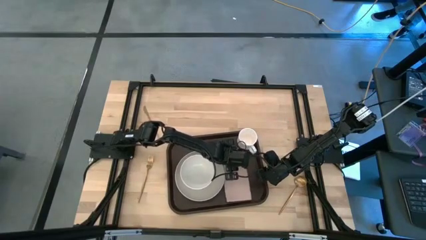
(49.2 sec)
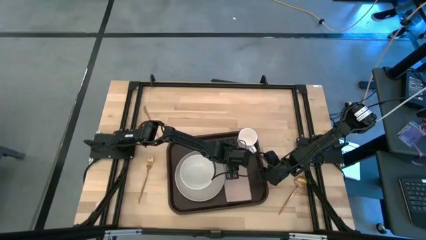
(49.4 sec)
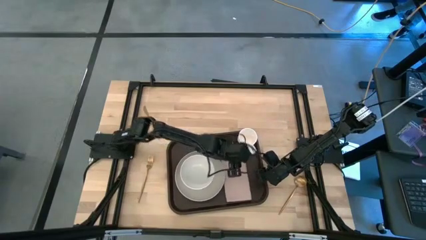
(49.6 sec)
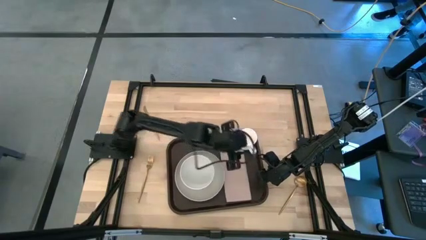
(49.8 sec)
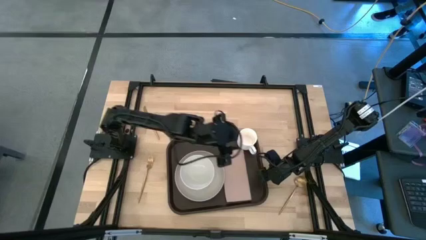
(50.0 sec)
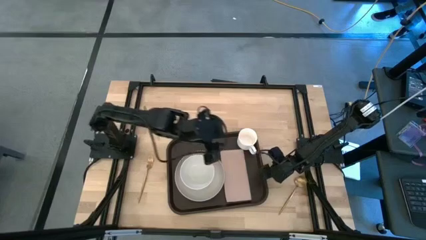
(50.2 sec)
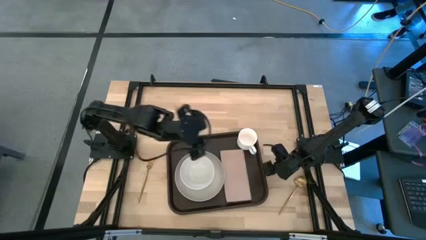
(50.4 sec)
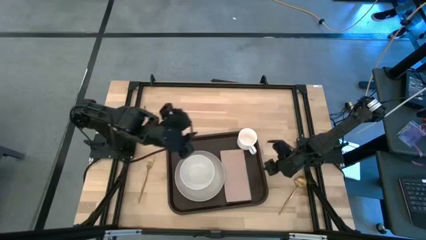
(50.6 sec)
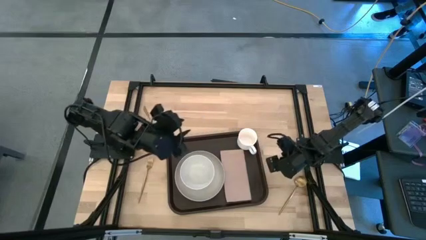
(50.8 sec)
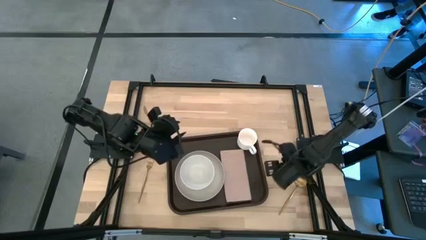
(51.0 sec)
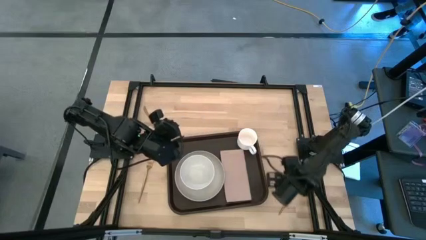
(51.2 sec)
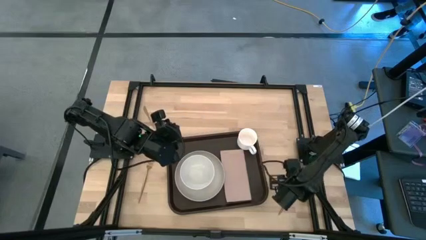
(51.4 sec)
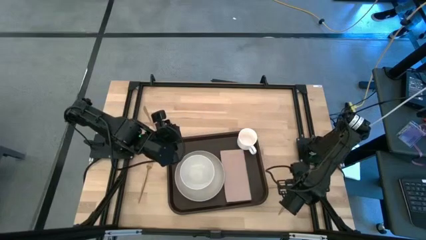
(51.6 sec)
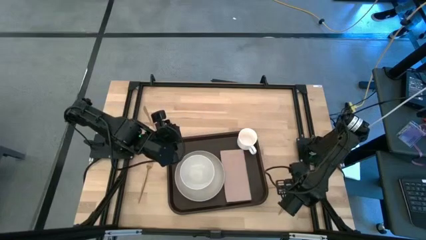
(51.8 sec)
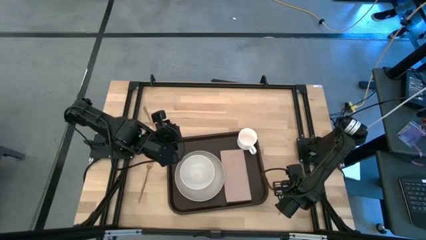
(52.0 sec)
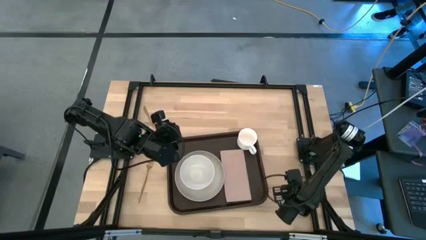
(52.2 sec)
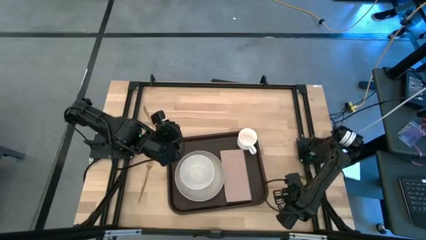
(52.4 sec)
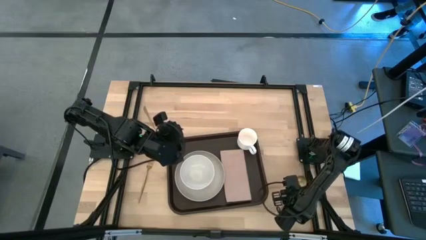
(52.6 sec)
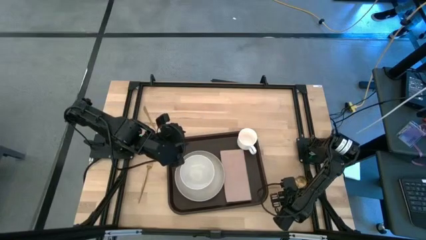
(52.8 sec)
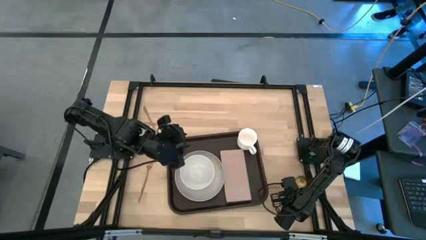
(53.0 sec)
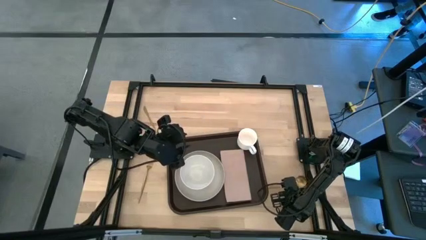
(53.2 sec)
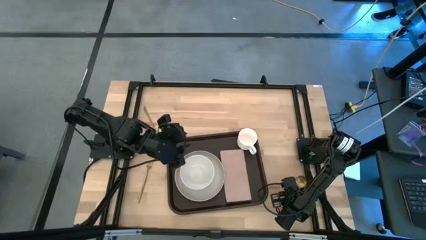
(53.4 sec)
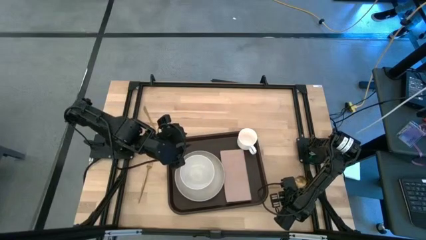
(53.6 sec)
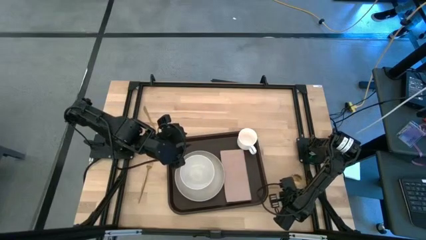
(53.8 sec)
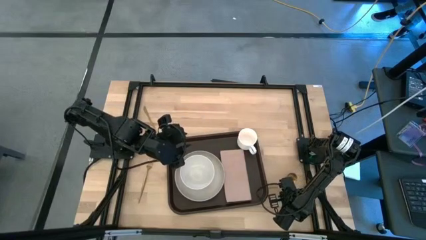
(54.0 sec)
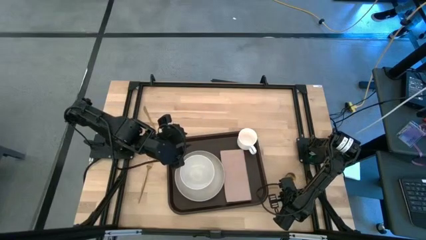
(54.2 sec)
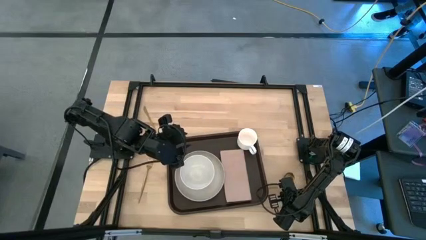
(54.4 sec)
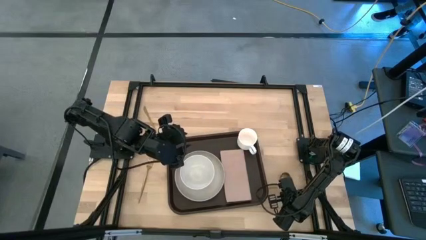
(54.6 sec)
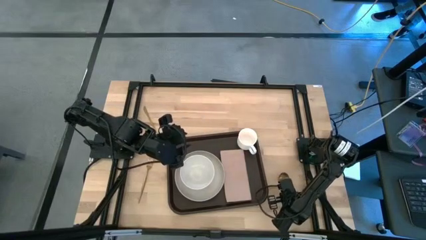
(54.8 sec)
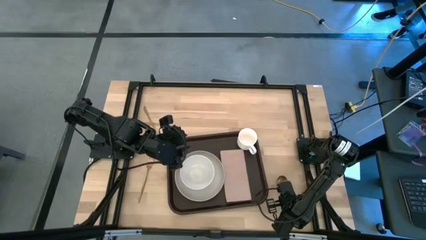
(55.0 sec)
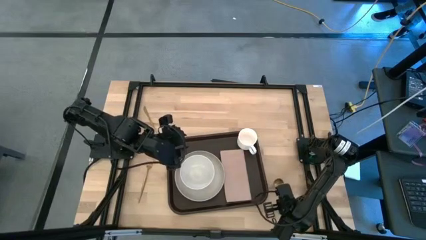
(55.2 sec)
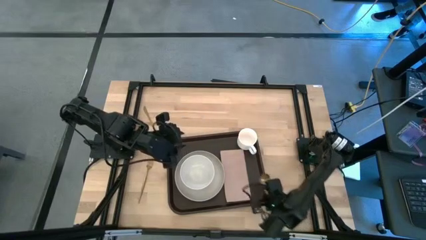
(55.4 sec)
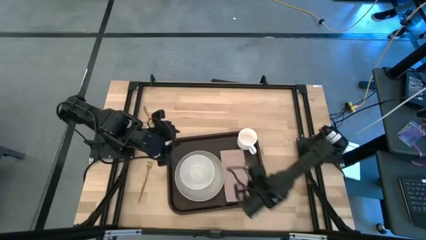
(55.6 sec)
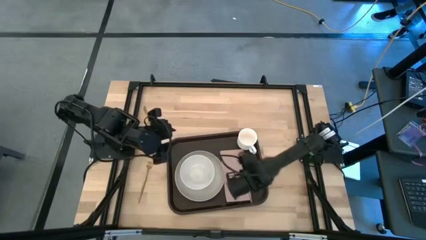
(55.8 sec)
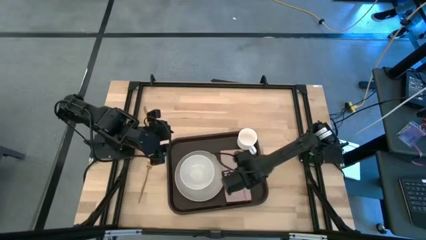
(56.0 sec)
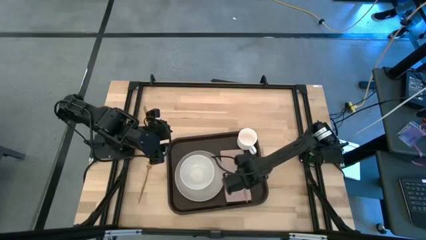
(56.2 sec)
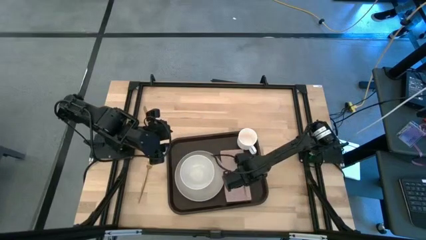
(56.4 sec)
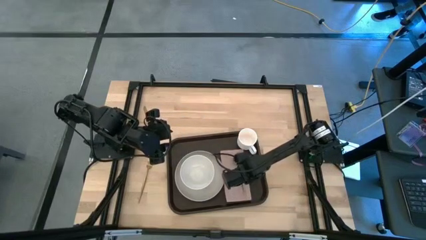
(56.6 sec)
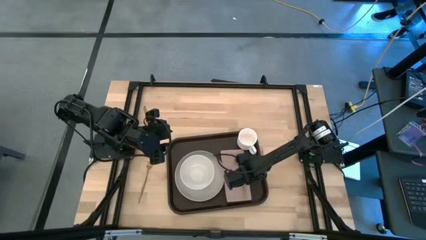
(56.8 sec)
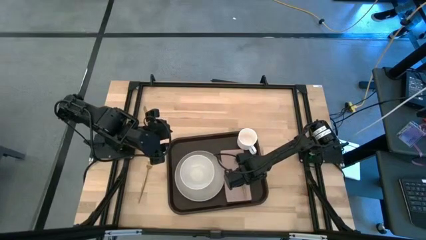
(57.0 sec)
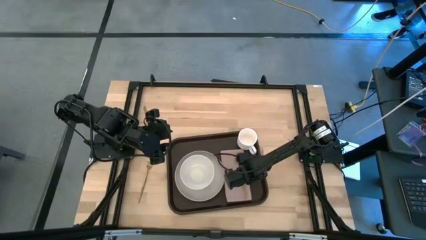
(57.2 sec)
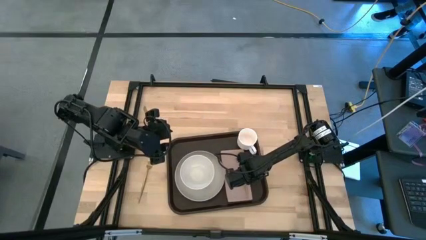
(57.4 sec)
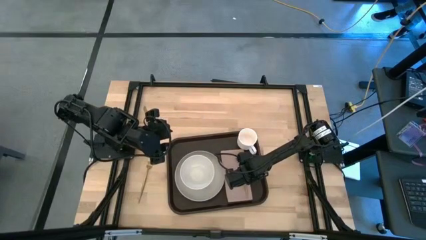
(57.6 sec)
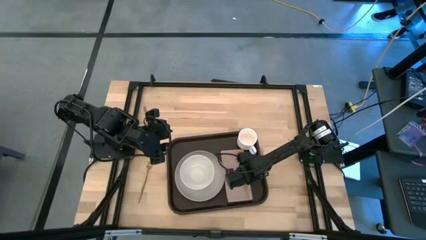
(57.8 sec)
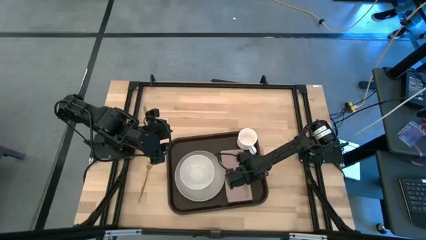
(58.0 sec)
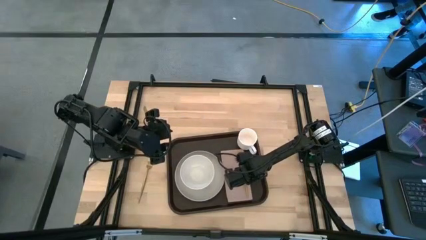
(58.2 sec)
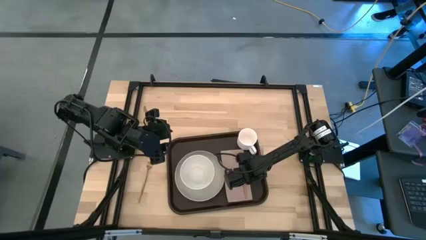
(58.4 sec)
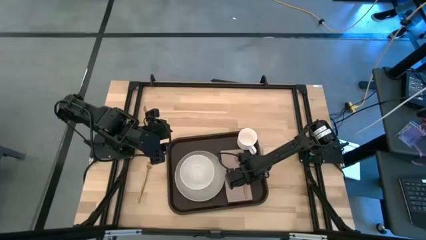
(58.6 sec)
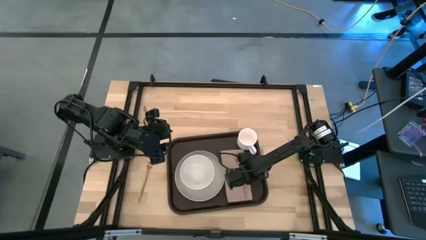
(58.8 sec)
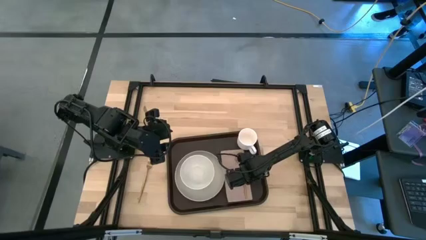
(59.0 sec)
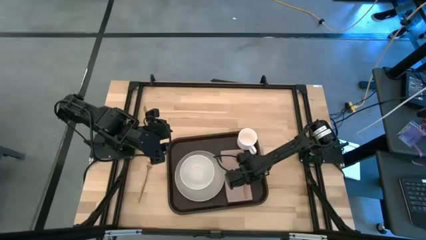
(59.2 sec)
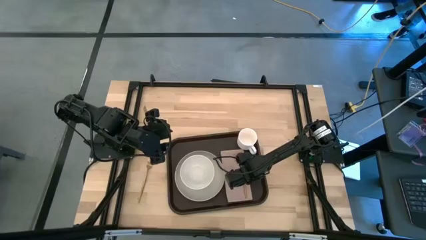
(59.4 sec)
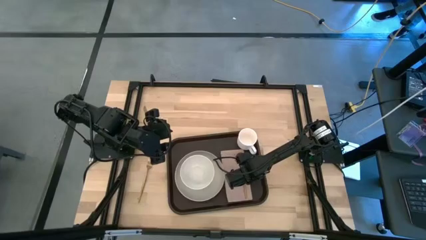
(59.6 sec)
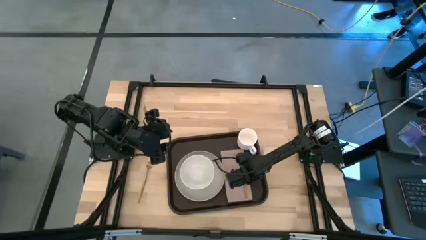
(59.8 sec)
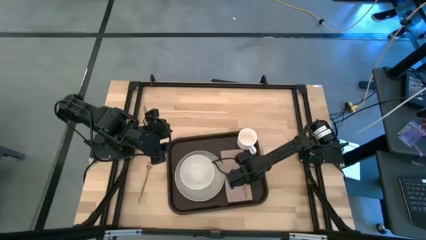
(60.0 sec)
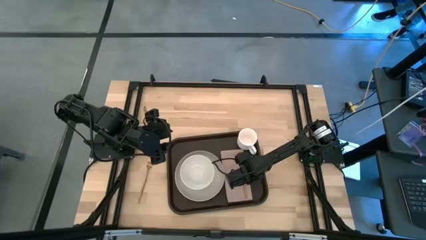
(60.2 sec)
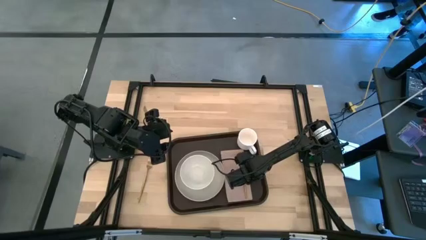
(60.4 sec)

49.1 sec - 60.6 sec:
Task: Set up tray
Put the golden spoon on top of the brown napkin on the brown serving tray

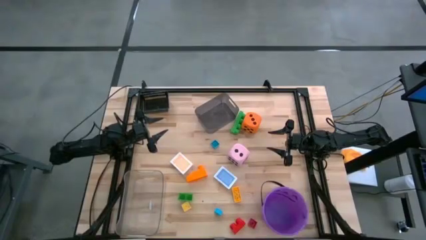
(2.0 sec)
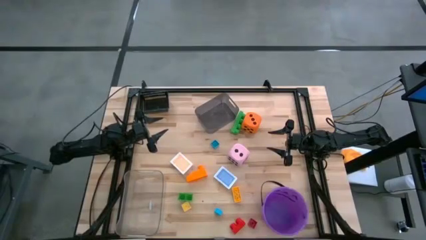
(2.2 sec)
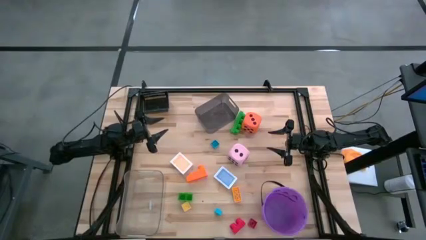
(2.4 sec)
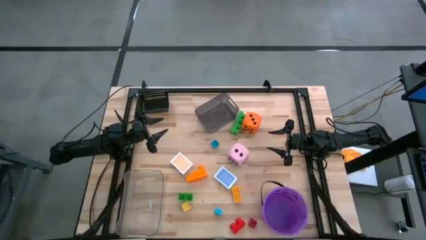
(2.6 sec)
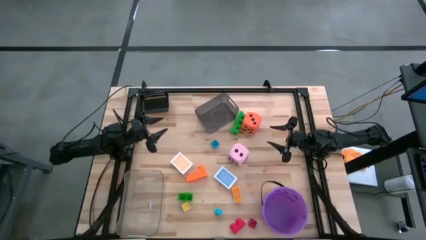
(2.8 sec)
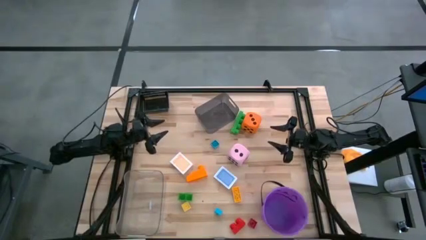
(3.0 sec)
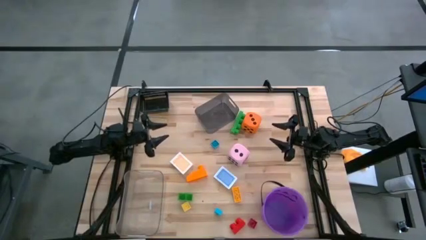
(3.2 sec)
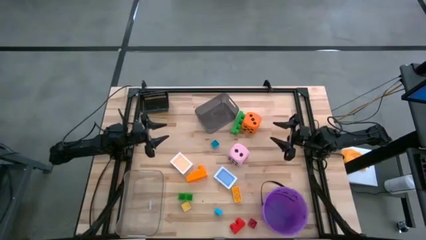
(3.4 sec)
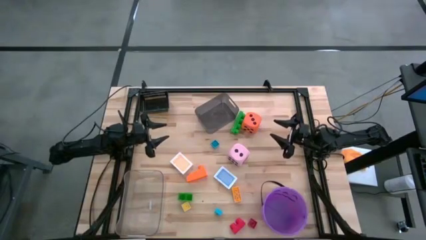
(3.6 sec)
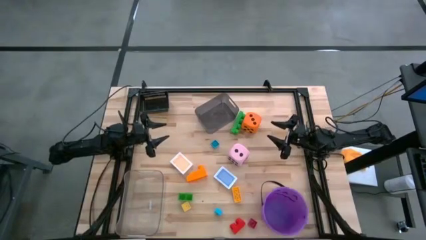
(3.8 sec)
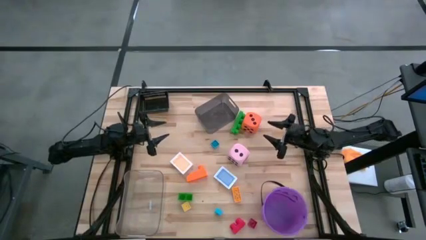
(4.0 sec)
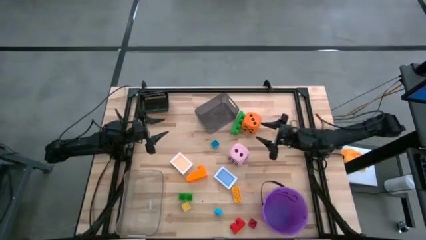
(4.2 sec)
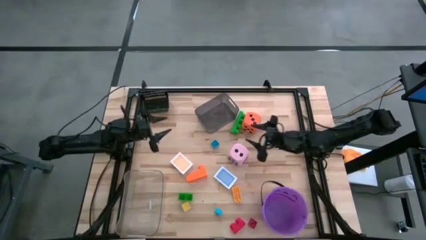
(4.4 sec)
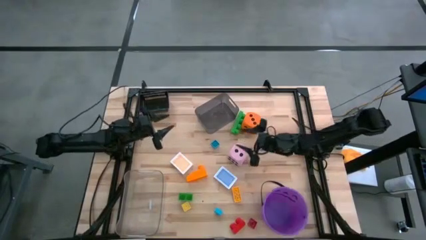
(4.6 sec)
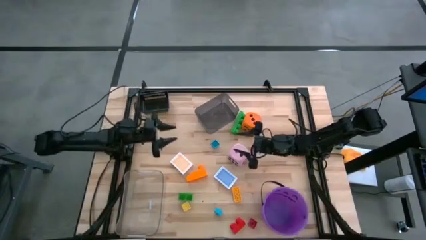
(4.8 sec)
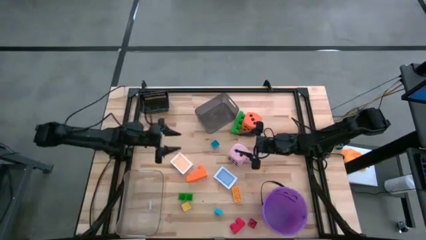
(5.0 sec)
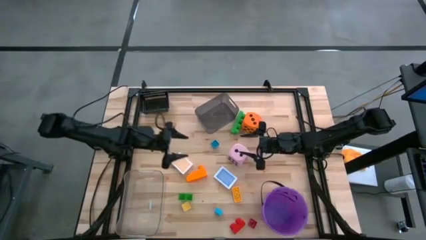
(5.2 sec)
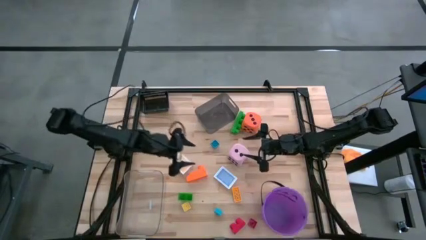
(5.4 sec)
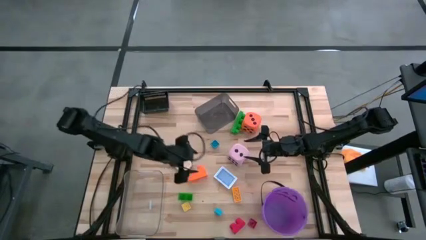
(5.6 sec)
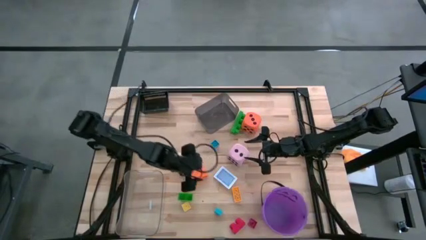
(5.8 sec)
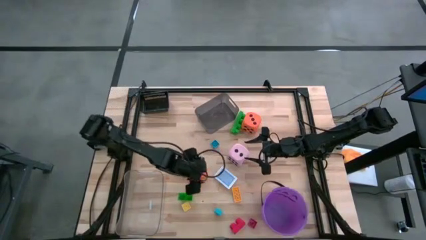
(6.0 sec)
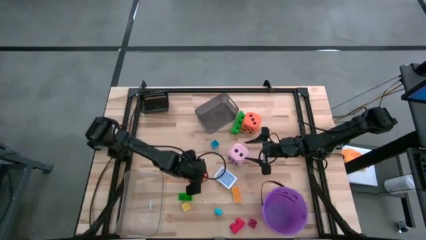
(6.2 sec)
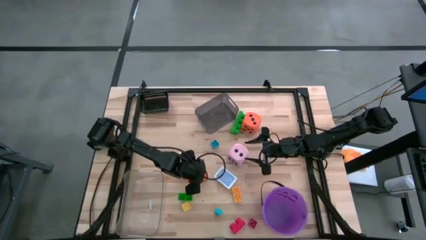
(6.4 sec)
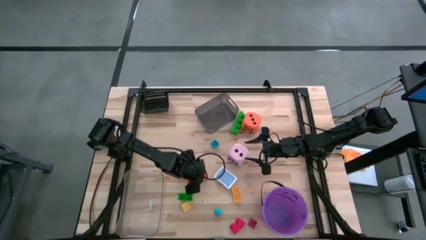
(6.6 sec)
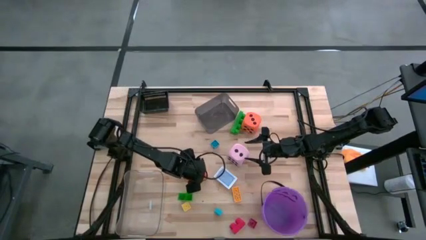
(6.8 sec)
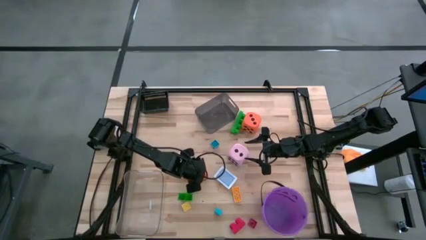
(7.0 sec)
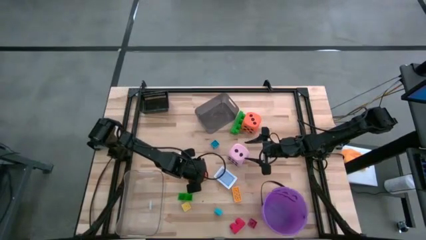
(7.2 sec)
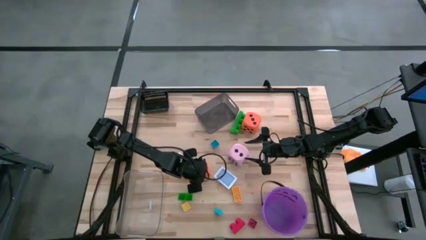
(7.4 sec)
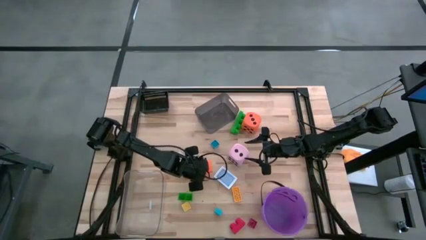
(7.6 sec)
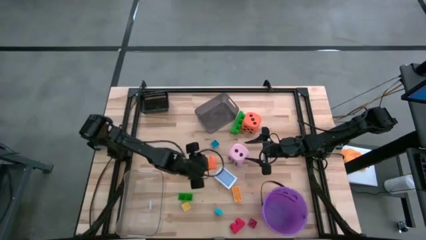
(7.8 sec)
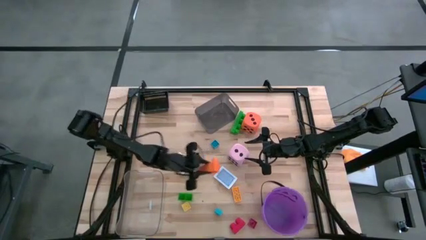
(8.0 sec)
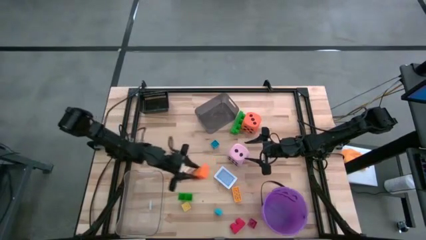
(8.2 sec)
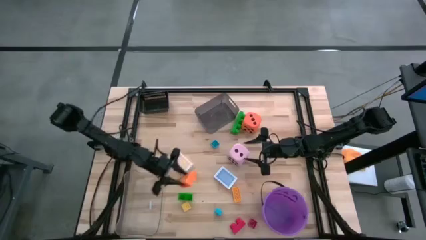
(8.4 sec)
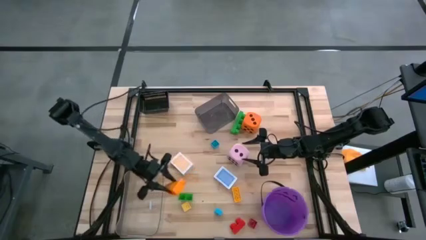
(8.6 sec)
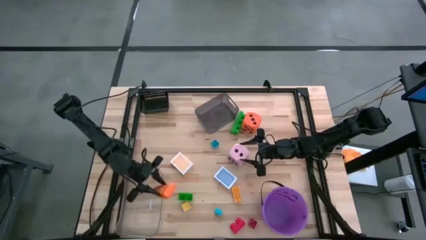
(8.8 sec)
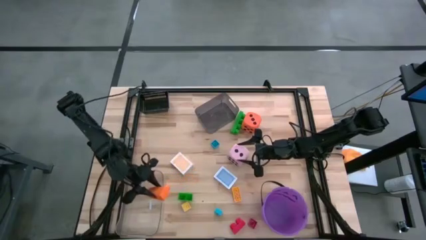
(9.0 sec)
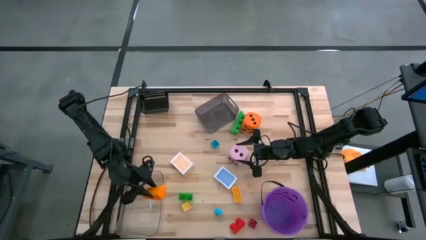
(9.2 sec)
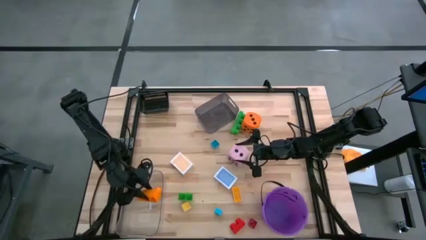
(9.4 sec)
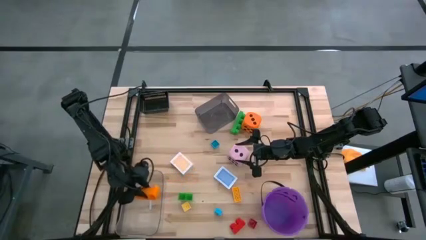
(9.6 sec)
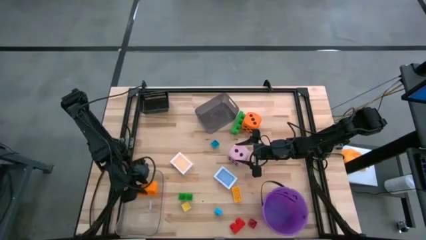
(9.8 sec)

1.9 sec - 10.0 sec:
Task: Pick & Place Toys
Put the orange game piece into the transparent bin
